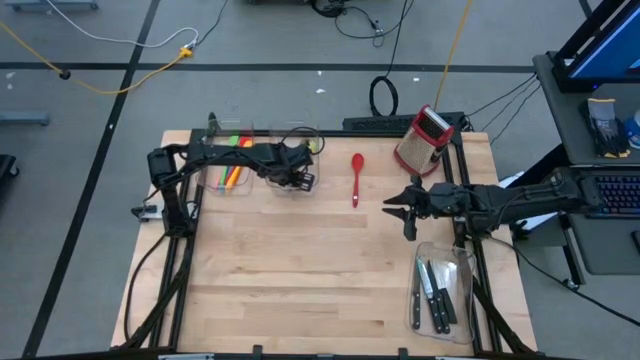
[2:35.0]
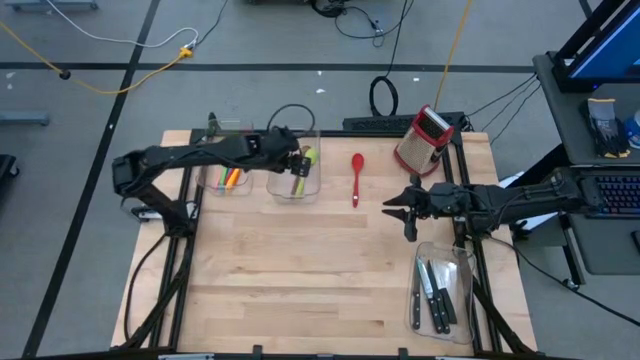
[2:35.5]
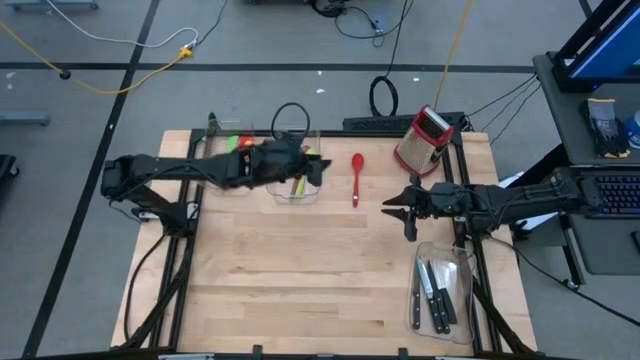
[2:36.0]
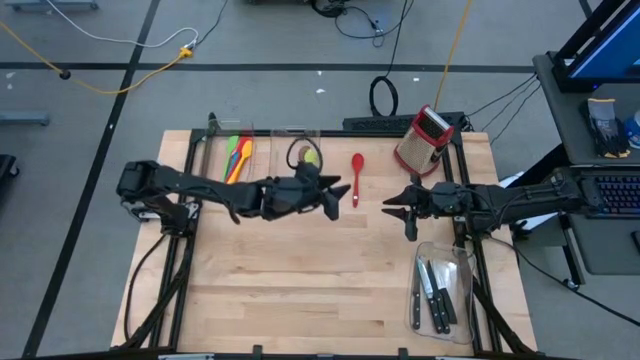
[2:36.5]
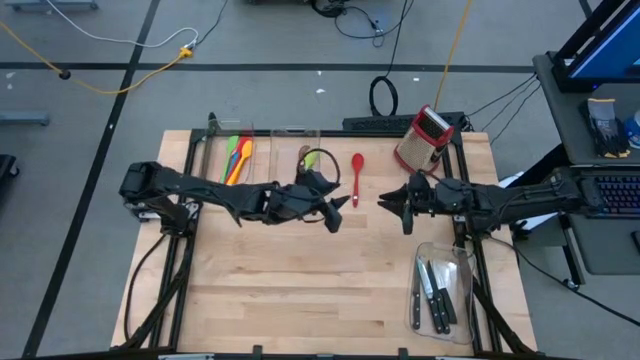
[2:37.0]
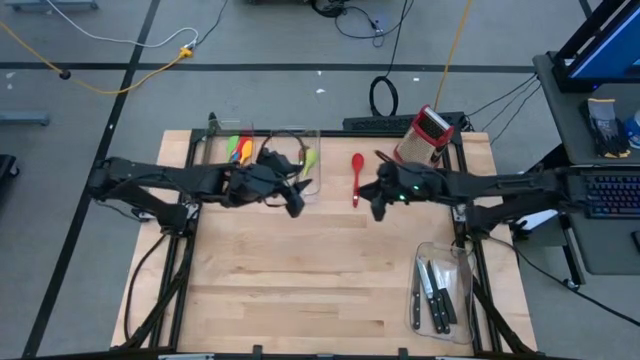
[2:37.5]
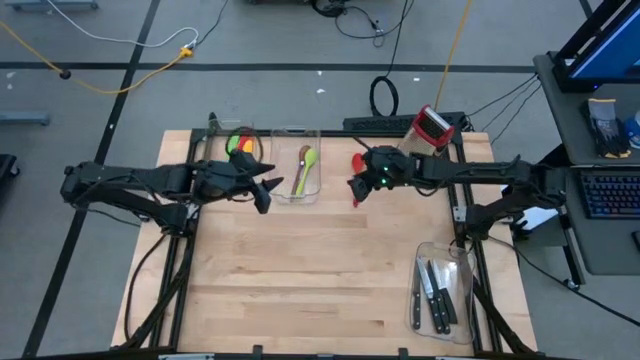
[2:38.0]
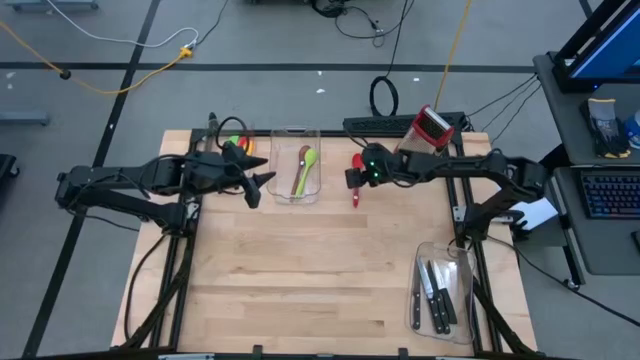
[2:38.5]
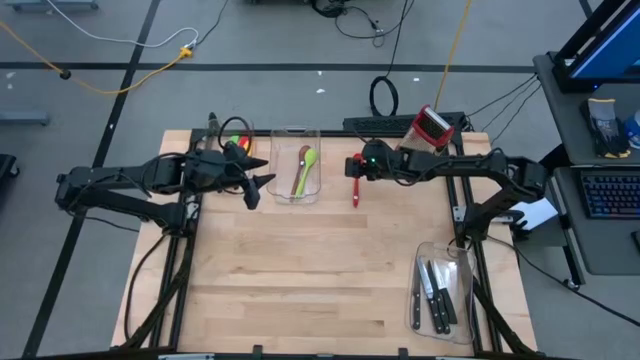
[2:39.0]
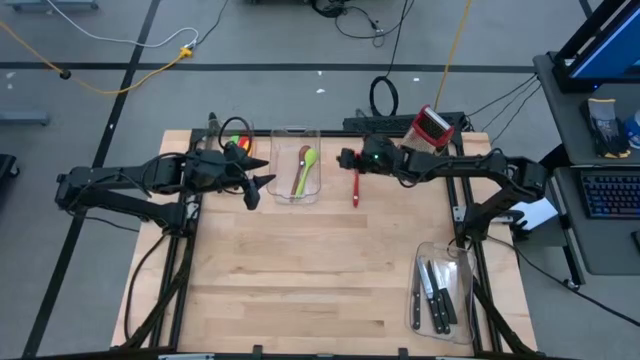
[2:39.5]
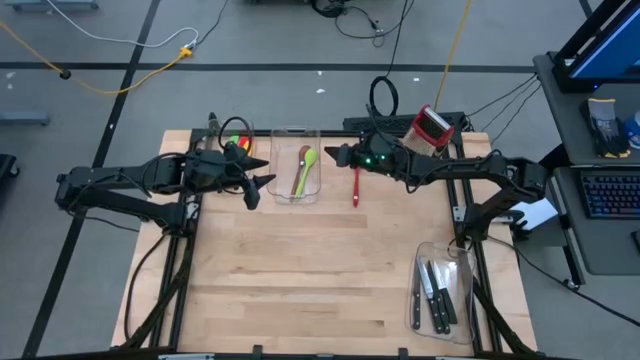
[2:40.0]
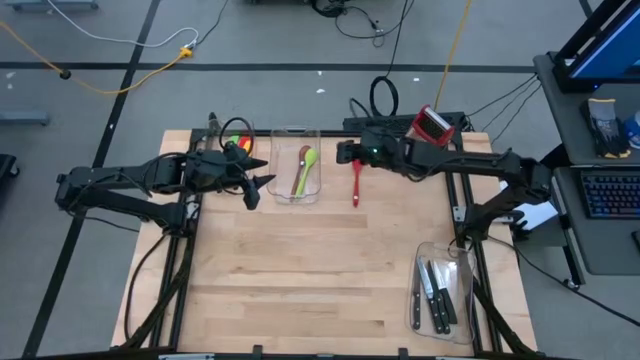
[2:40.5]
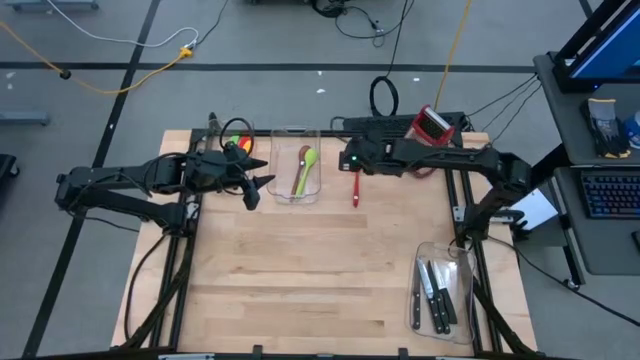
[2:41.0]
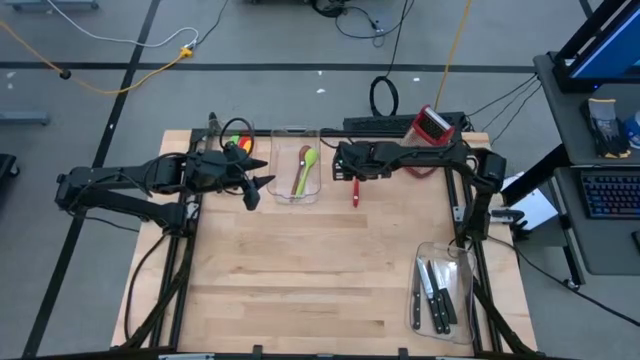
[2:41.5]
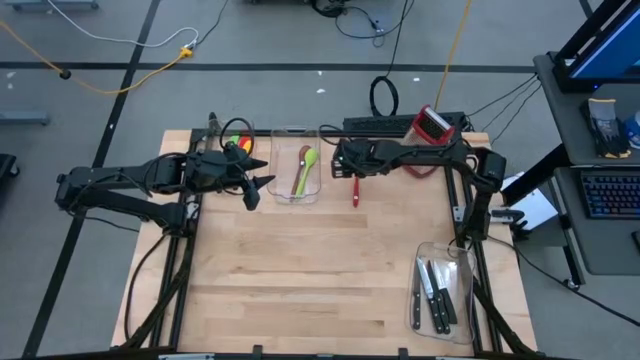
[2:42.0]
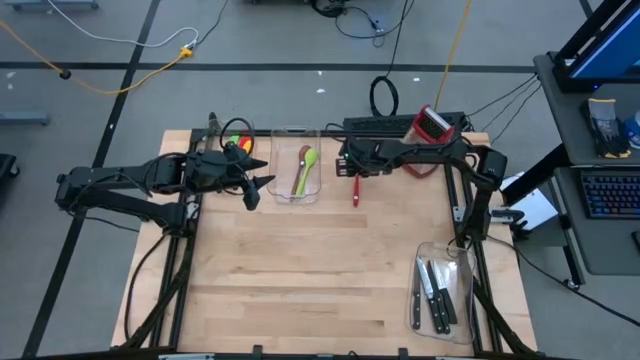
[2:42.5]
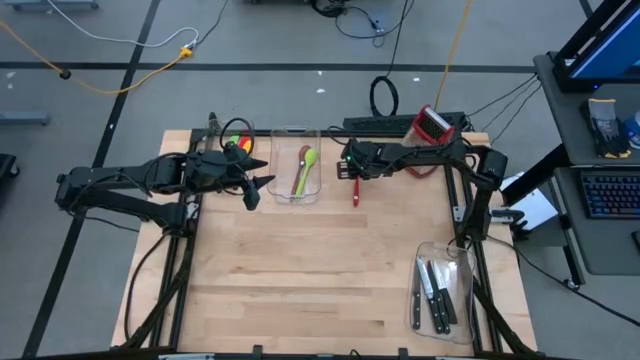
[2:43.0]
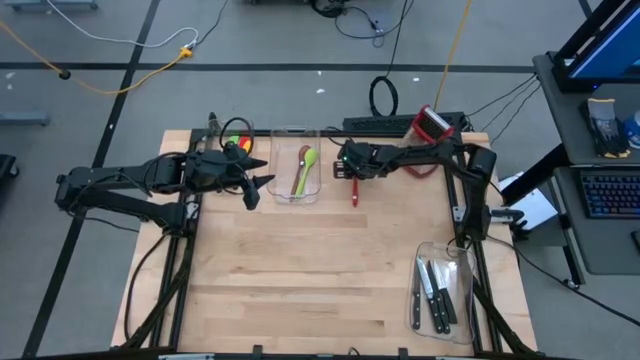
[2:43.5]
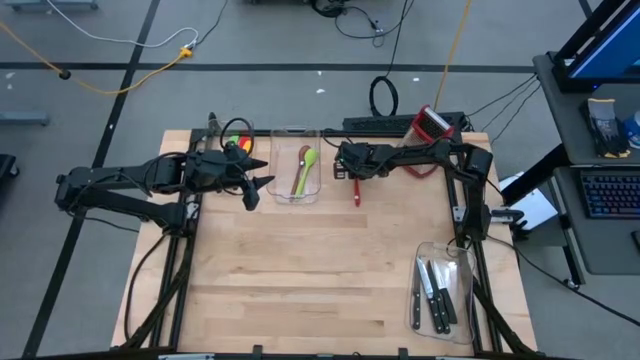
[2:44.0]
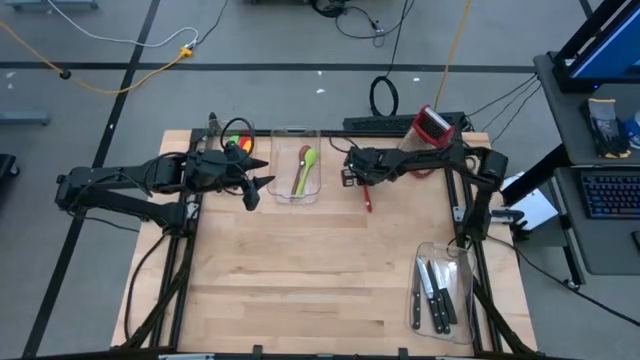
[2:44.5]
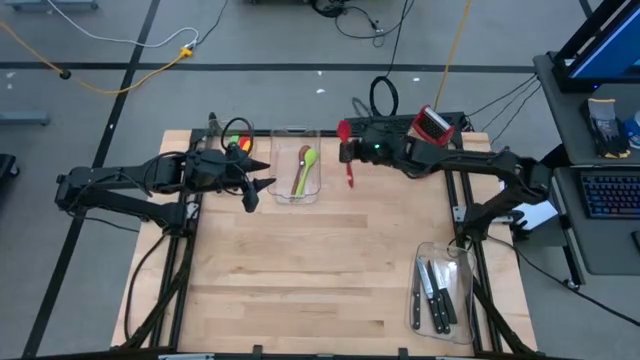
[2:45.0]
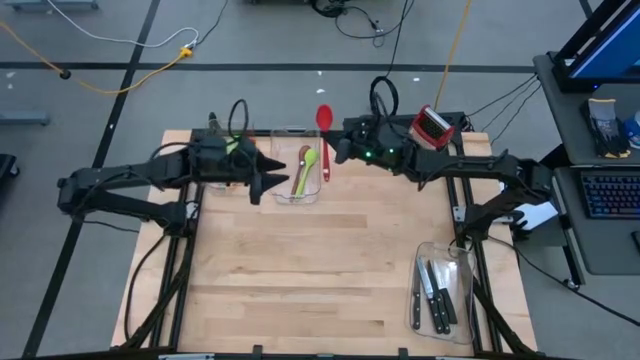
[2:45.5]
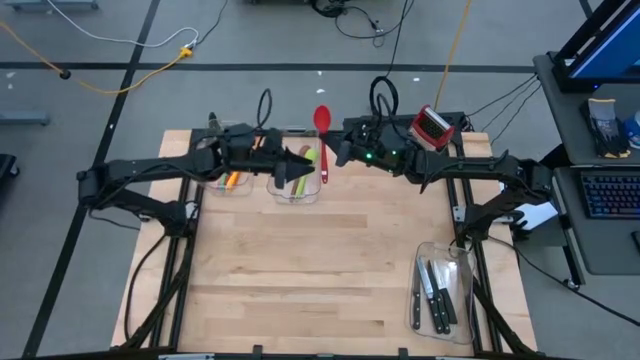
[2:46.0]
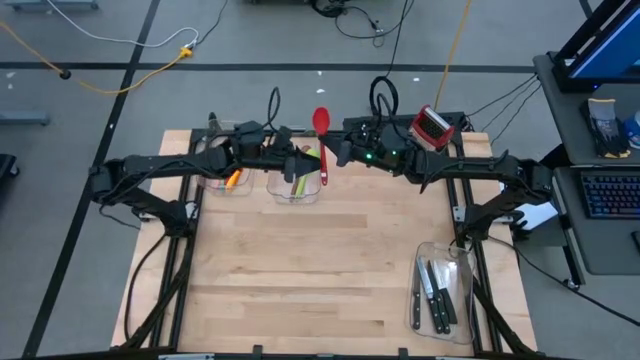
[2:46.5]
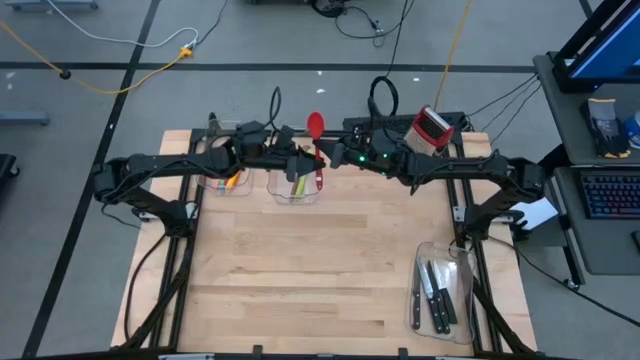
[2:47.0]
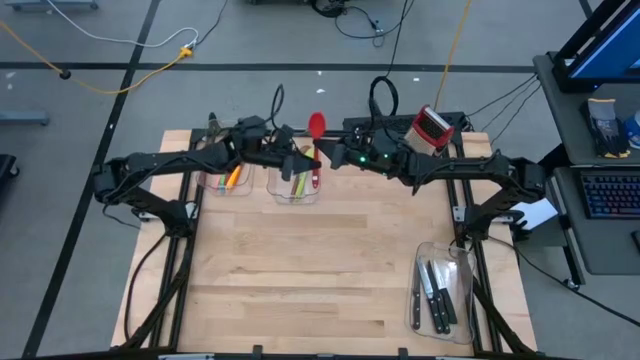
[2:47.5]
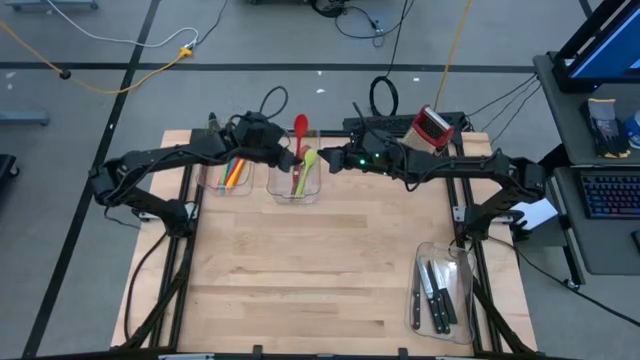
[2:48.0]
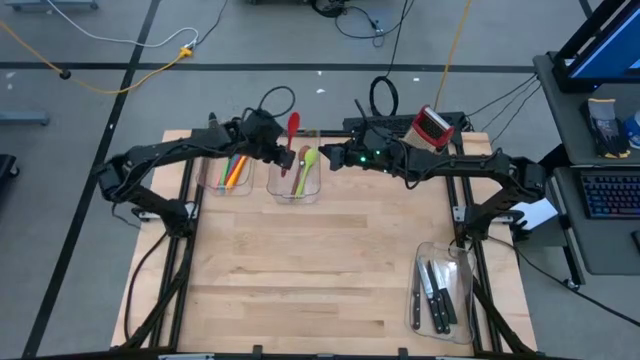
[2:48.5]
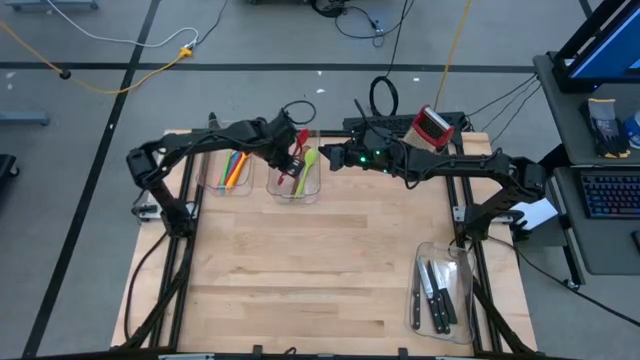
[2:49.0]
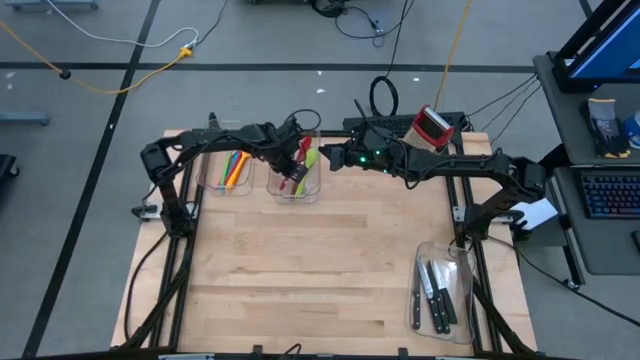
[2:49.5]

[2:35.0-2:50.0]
Task: Pick & Place Kitchen Items
Put the red serving spoon into the right transparent bin

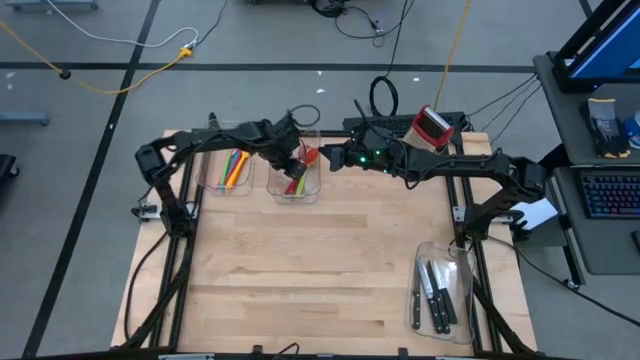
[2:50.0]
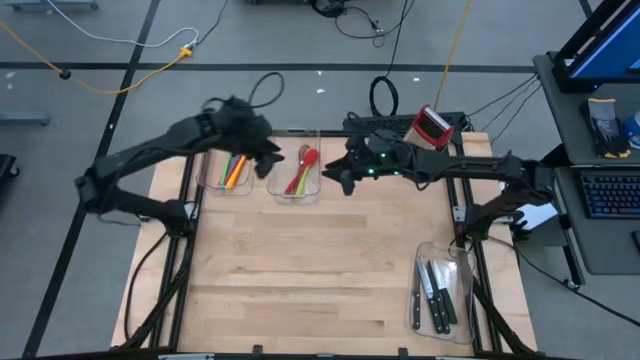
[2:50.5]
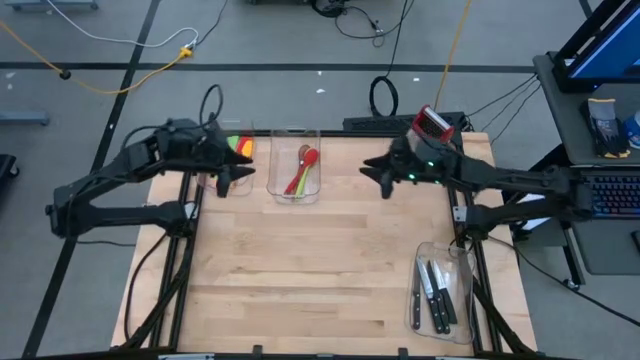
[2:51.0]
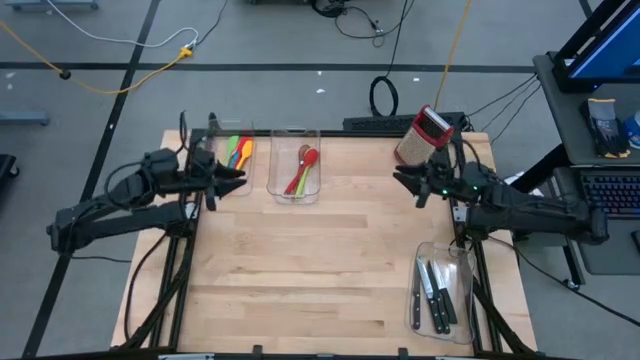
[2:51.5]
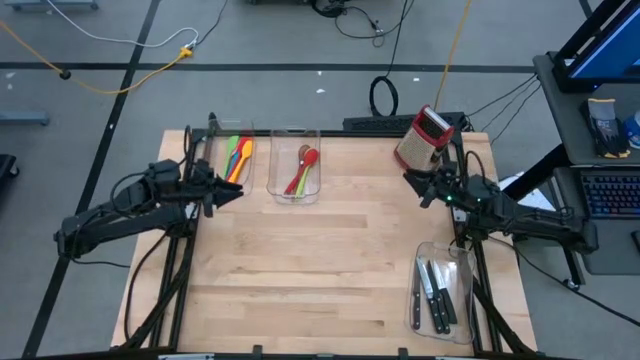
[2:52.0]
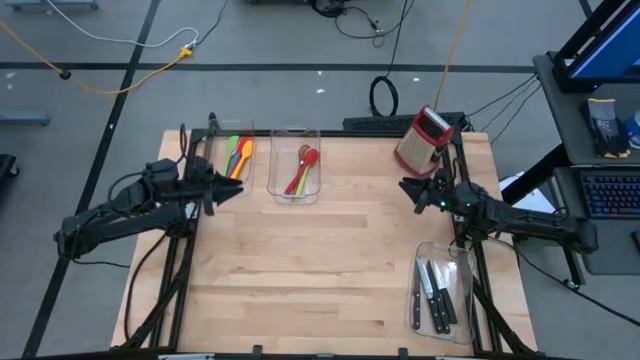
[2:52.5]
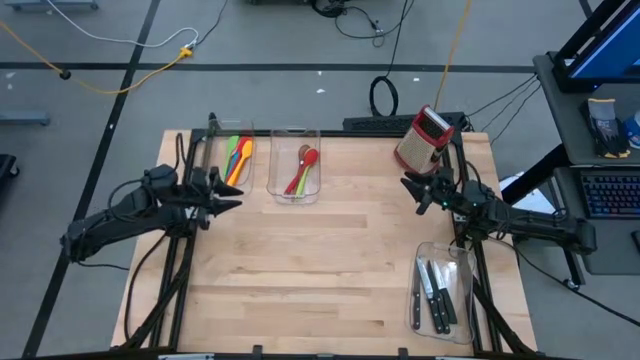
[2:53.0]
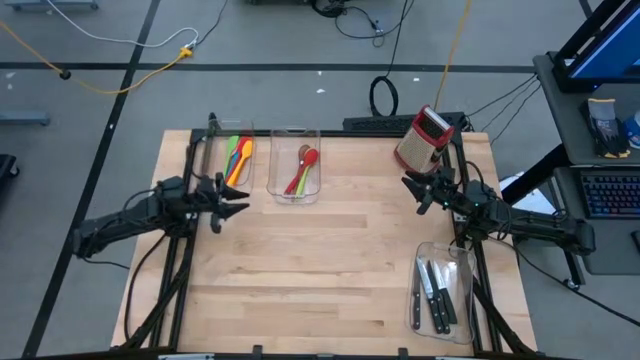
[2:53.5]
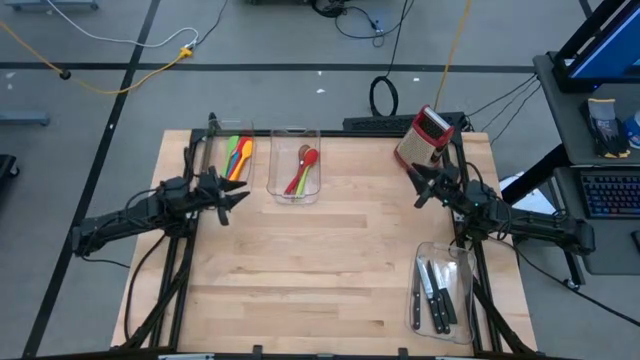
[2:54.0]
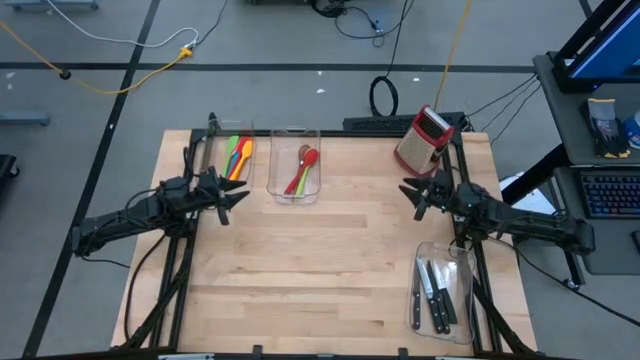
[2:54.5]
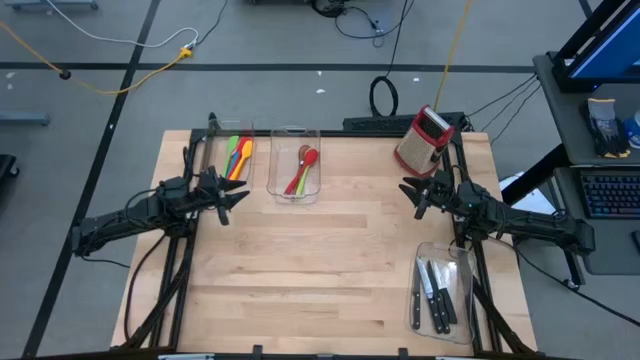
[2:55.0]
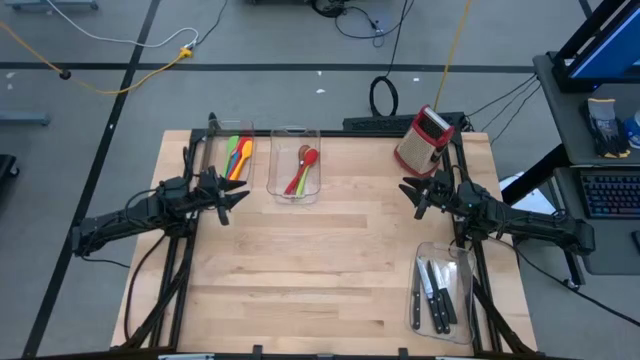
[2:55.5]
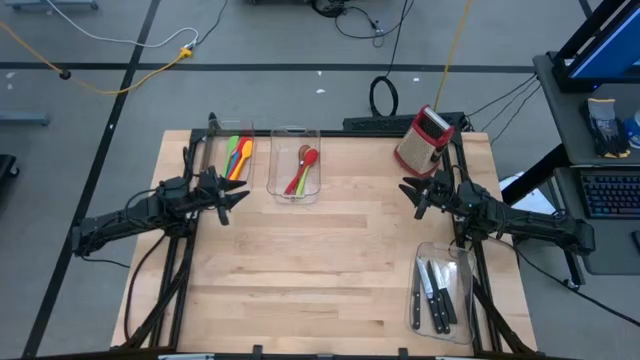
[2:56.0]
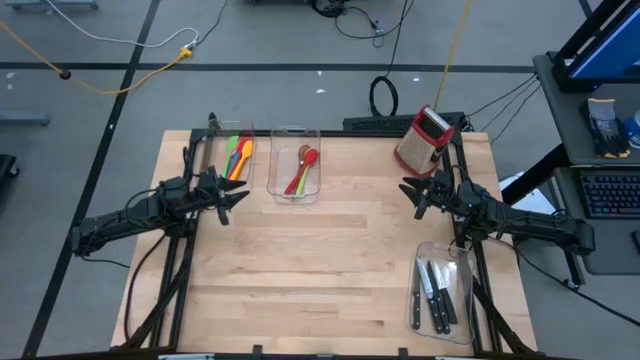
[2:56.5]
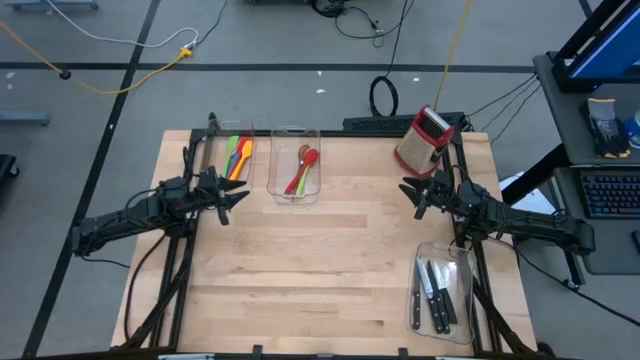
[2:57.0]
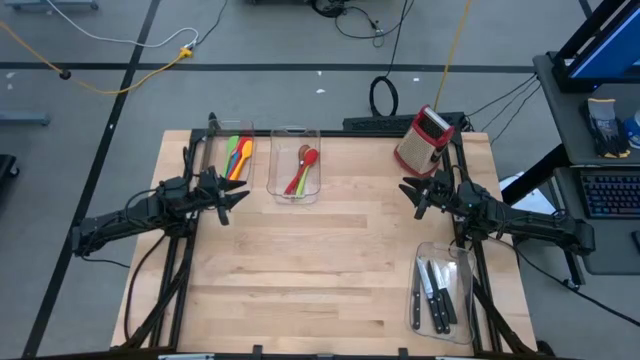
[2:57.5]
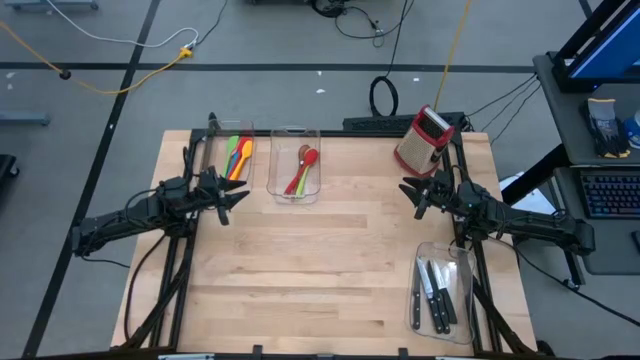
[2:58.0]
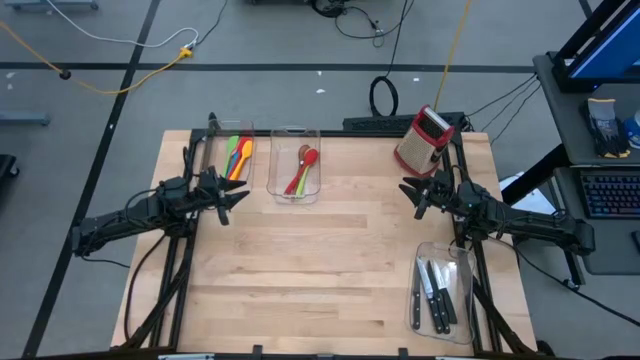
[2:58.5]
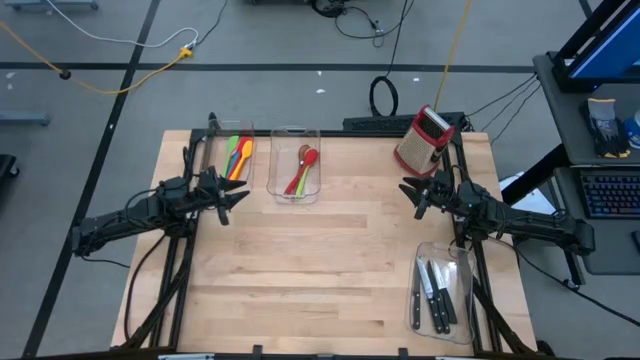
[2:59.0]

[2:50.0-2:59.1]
Return to Home Position
